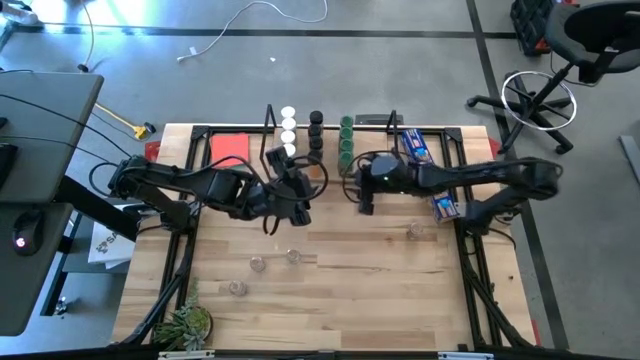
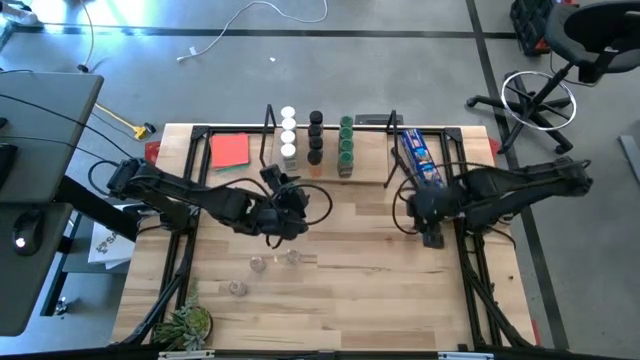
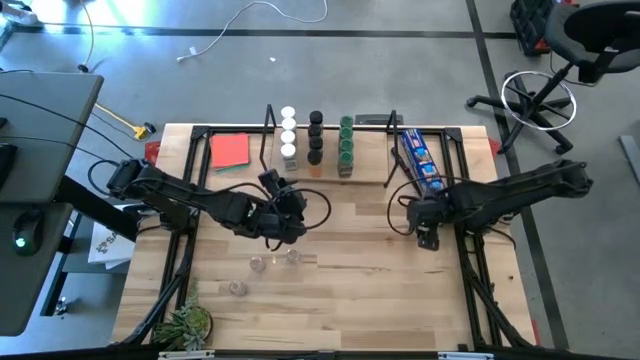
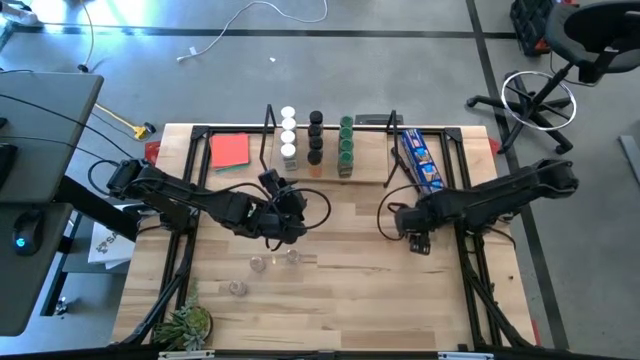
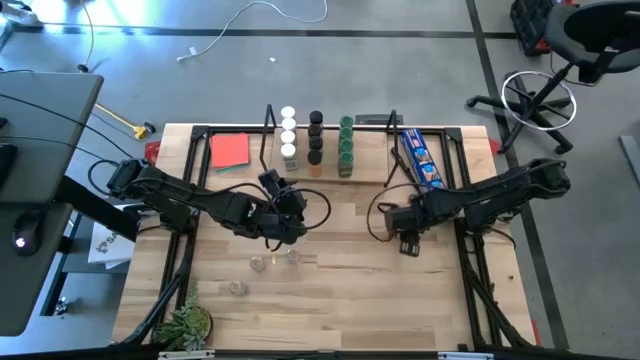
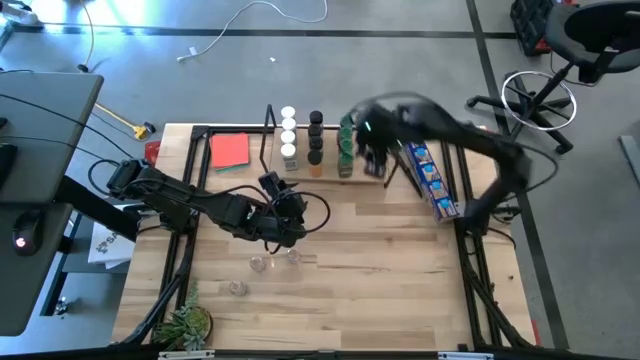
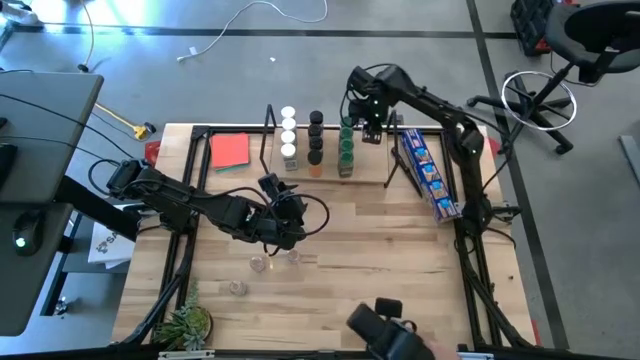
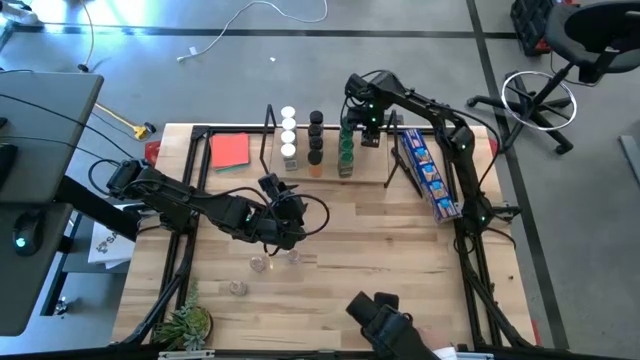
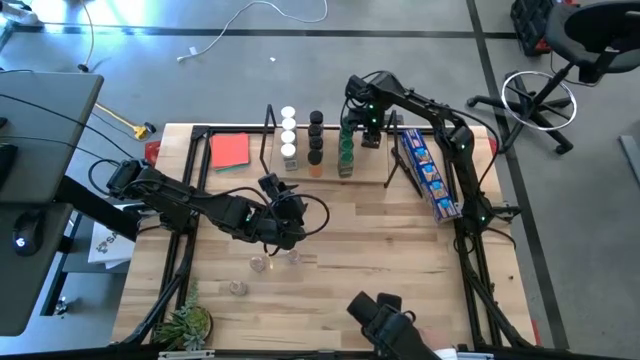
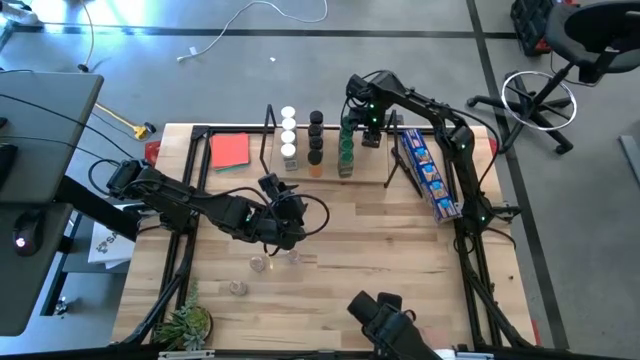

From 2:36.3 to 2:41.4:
Task: Shelf spices
Put the brown seasoning bottle on the shelf

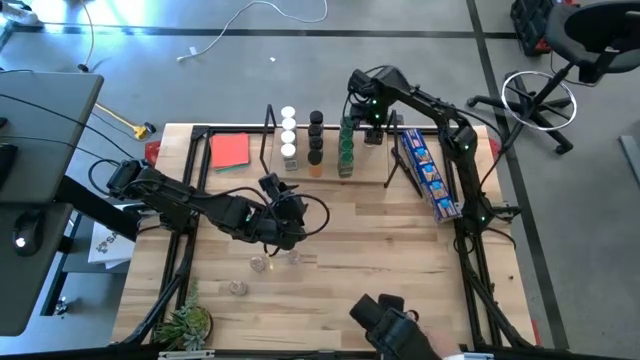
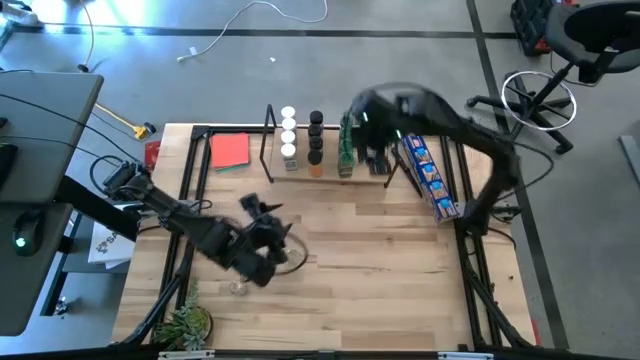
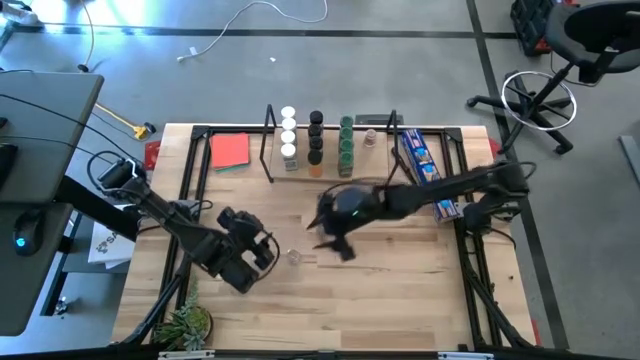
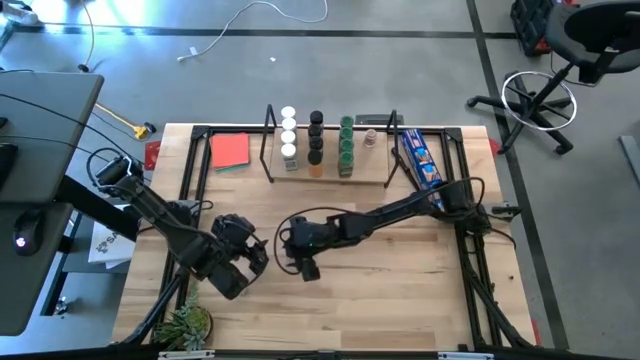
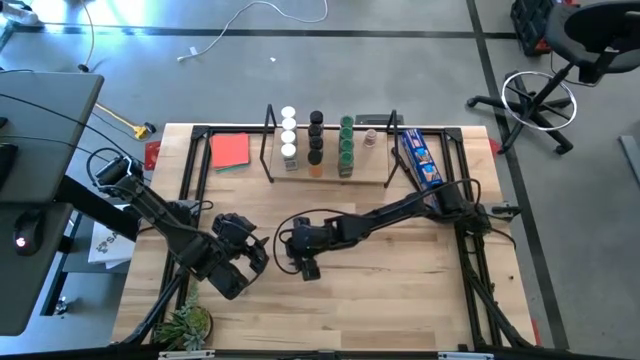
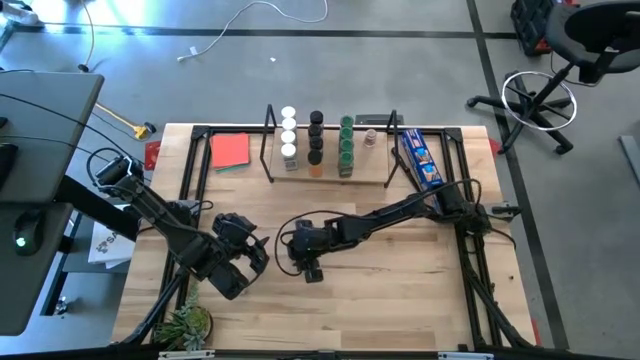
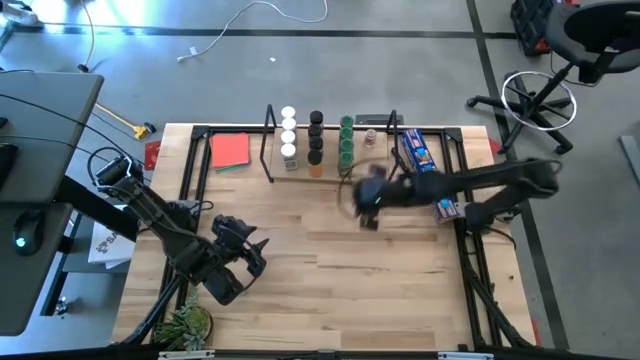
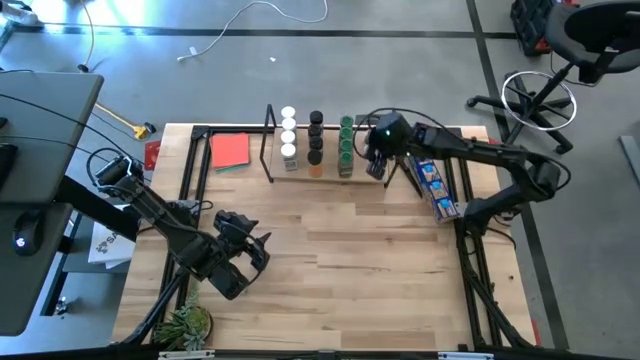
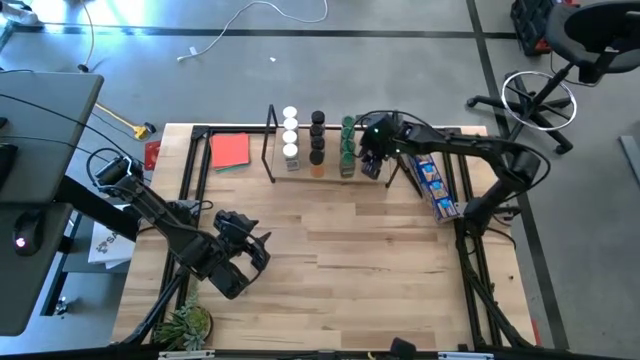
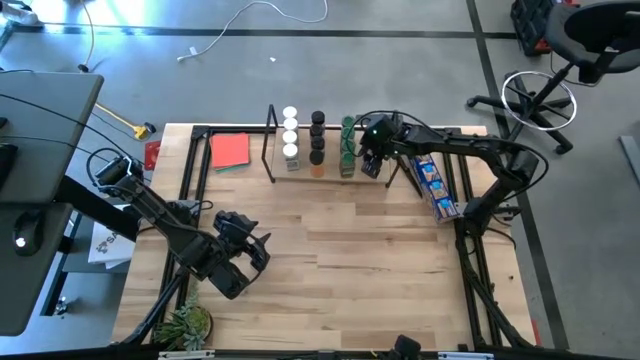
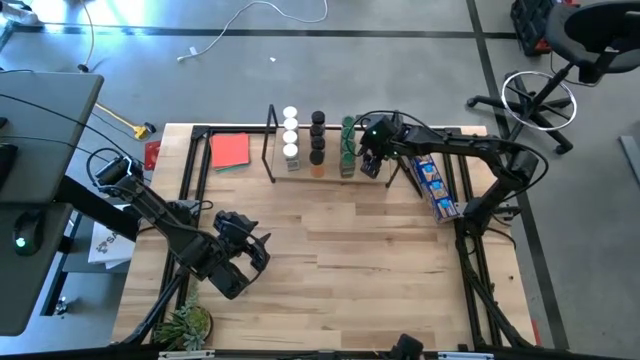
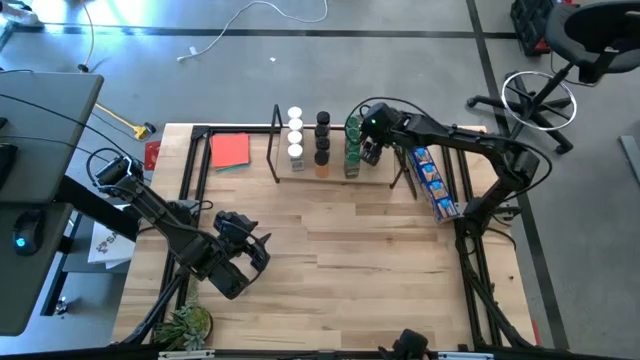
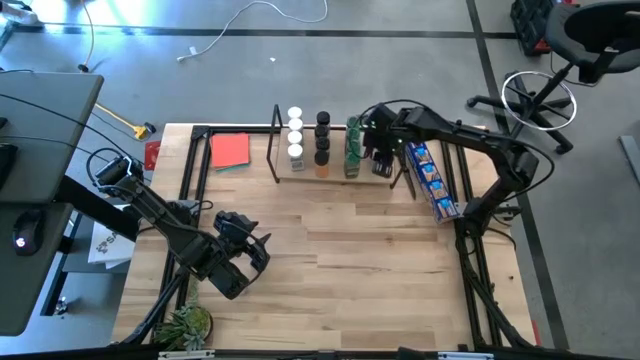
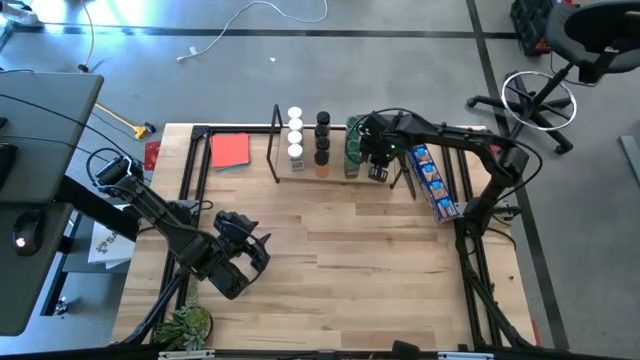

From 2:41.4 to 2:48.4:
Put the brown seasoning bottle on the shelf aligned with the other brown seasoning bottle

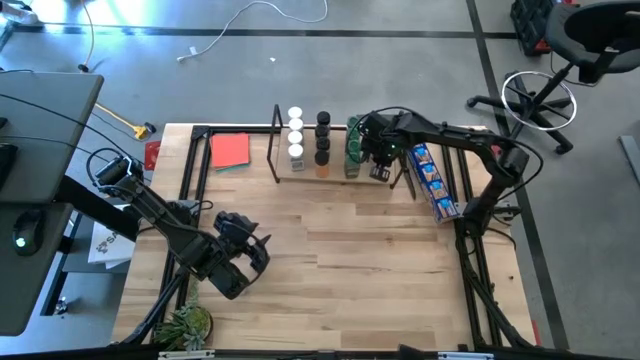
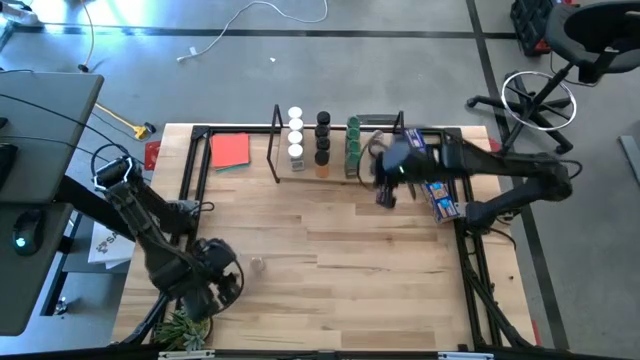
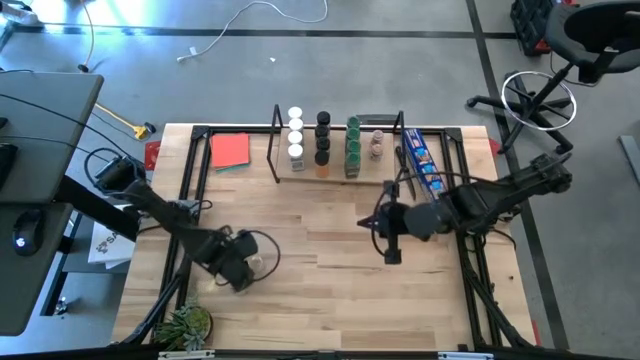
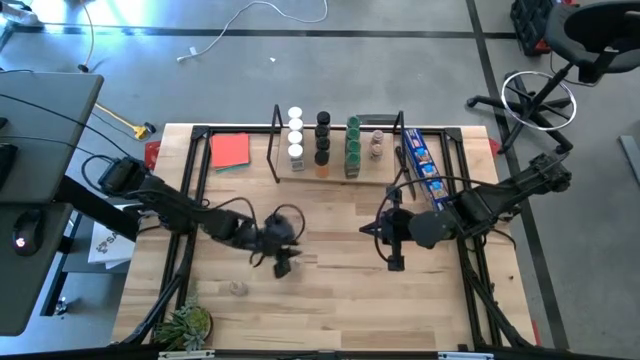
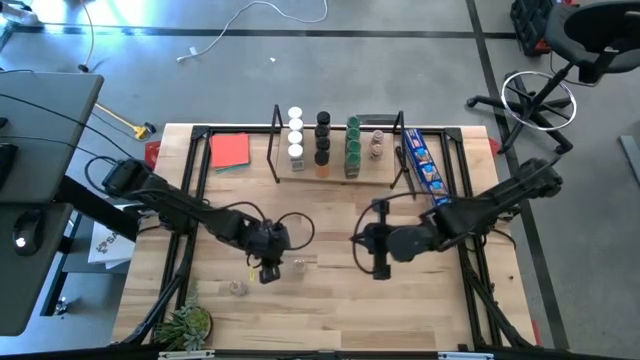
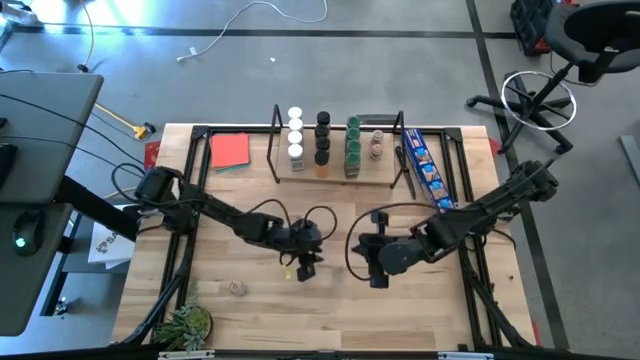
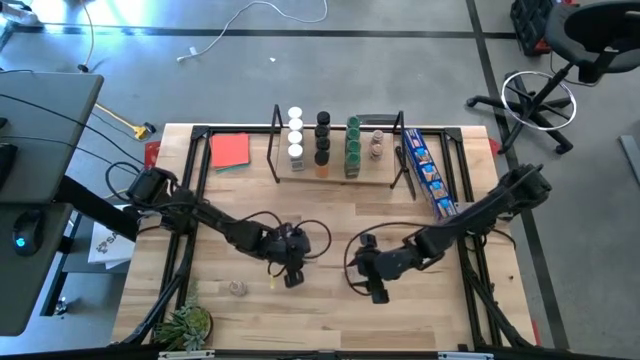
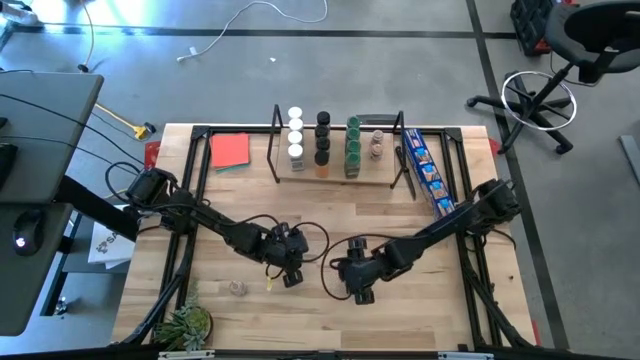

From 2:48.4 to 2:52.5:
Put the brown seasoning bottle on the shelf aligned with the other brown seasoning bottles

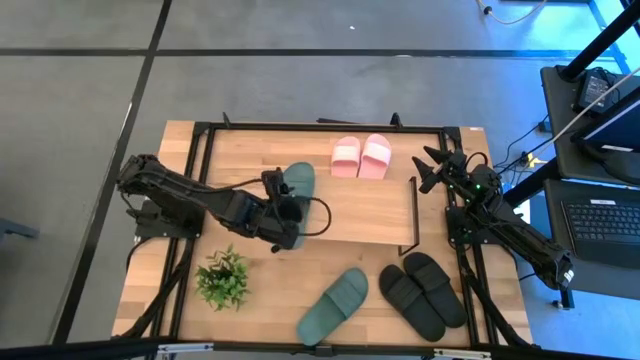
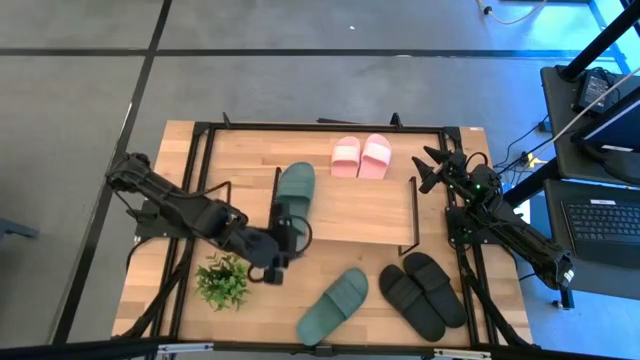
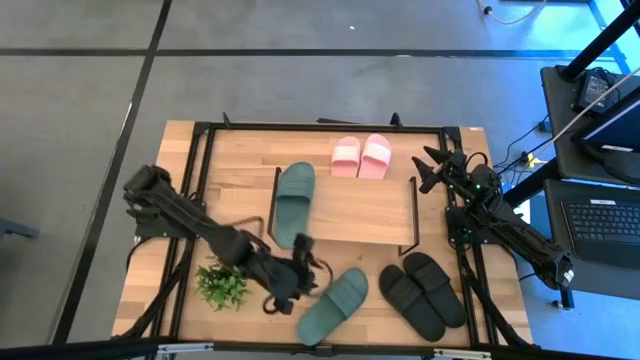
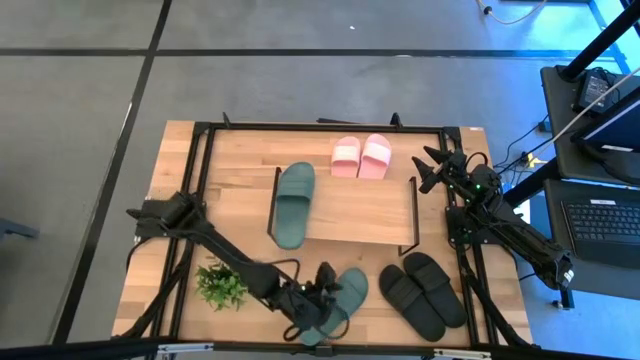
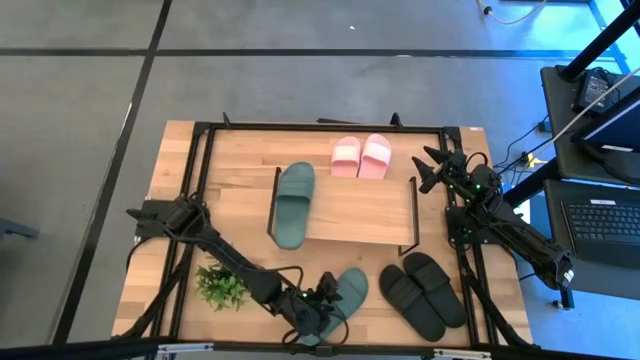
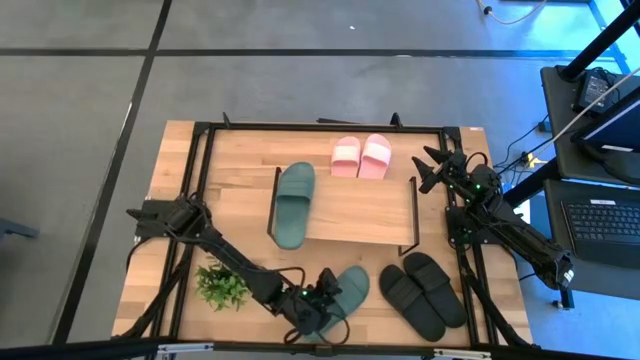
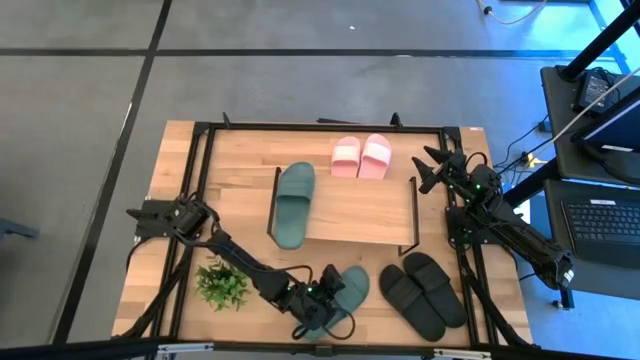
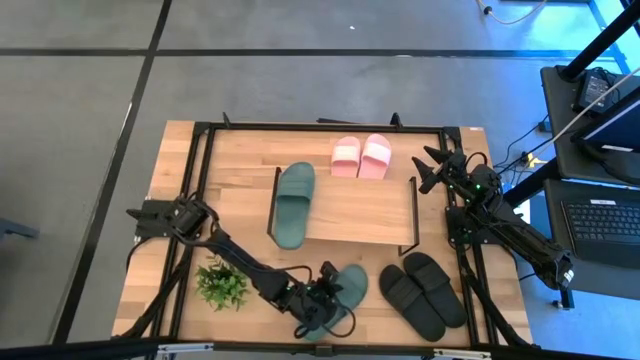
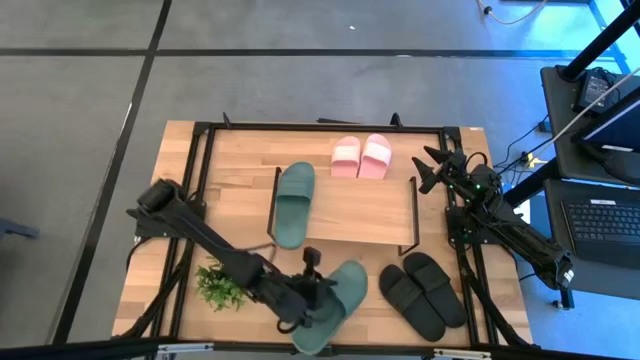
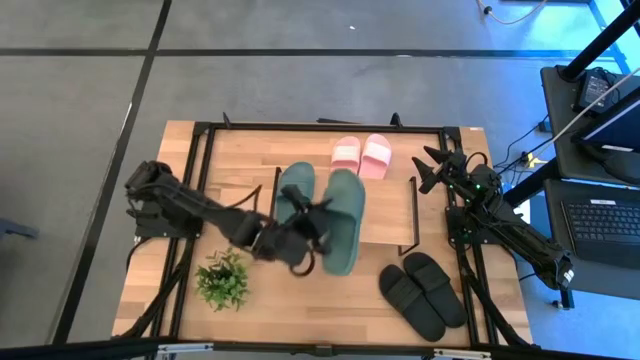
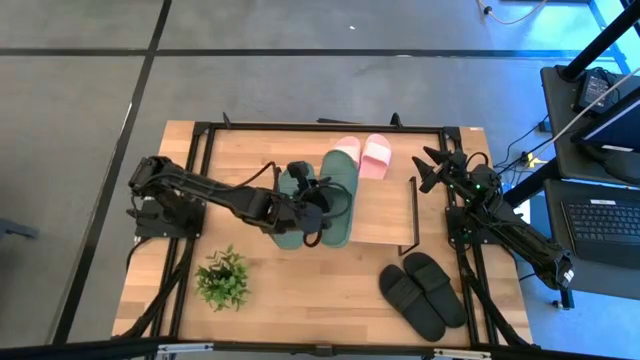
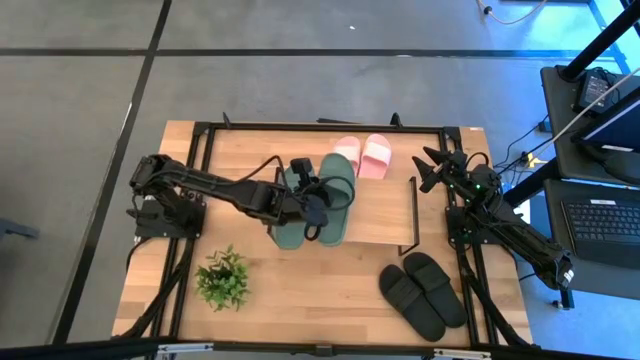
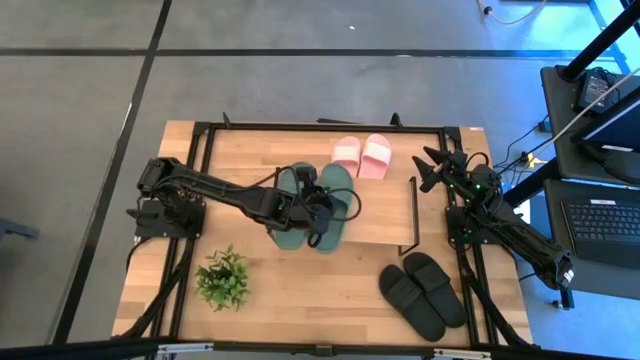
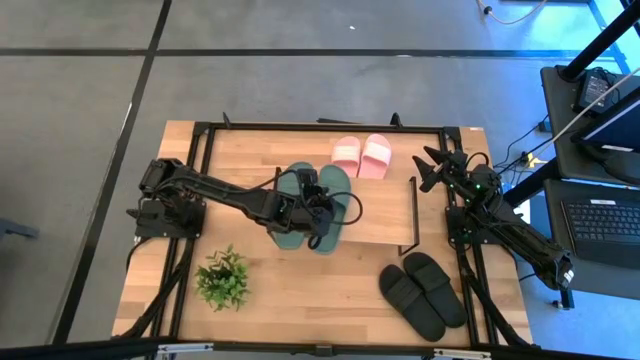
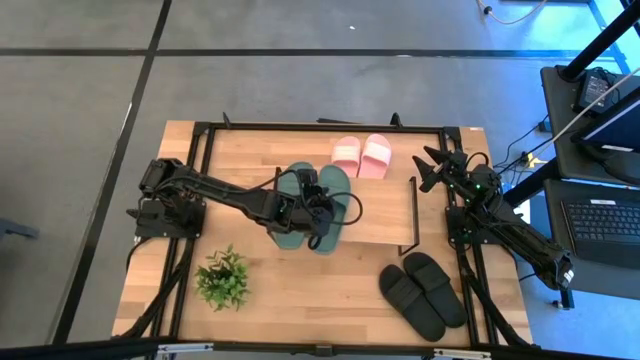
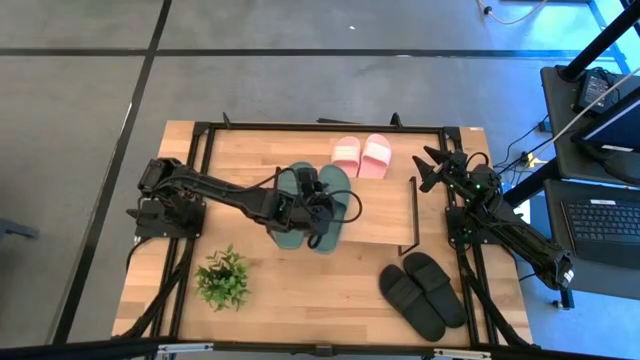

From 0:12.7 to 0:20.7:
Task: Pick and place slides into the shelf
Put the right green slipper on the shelf
